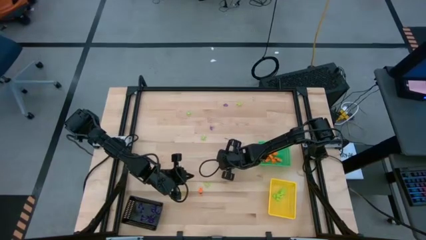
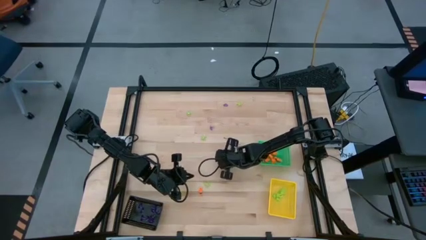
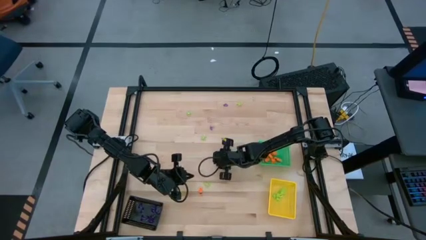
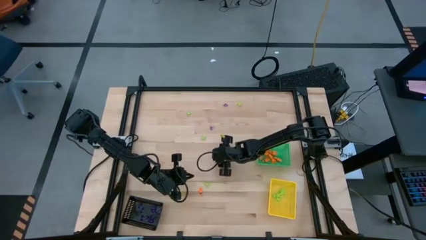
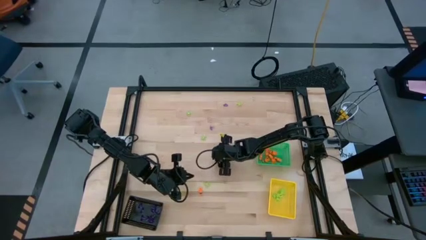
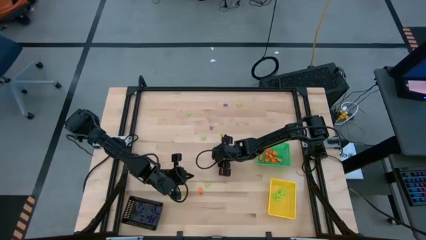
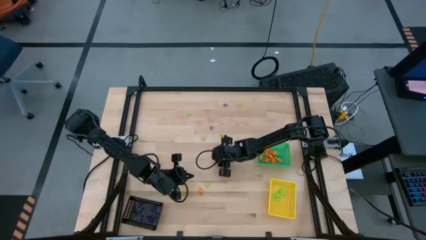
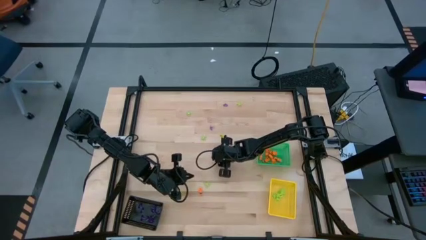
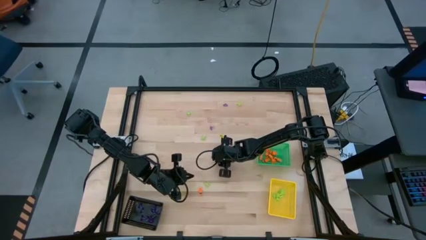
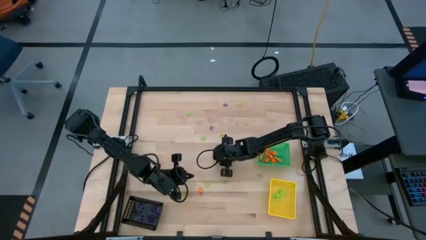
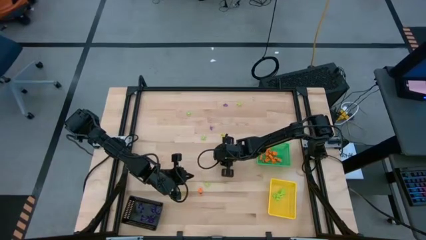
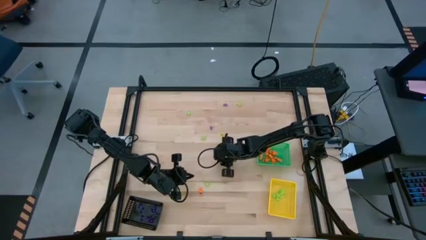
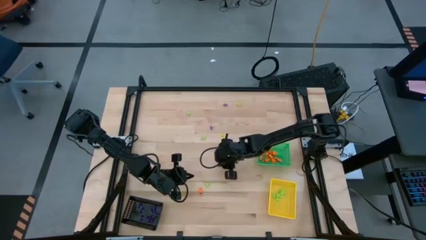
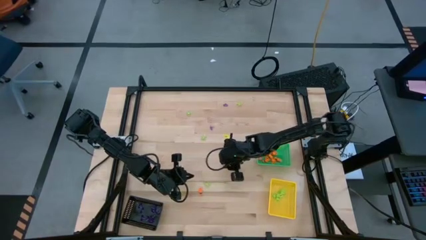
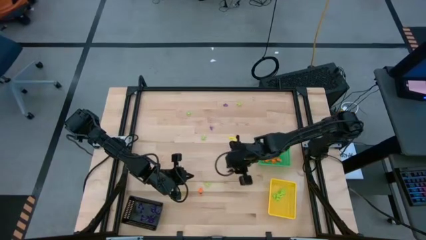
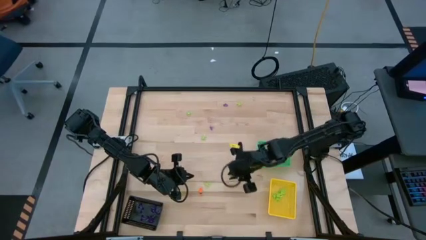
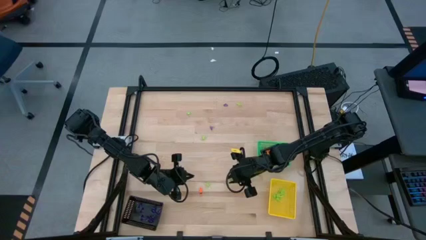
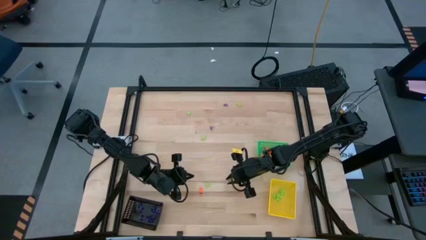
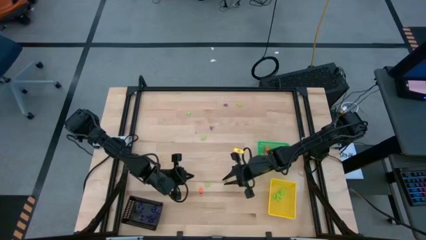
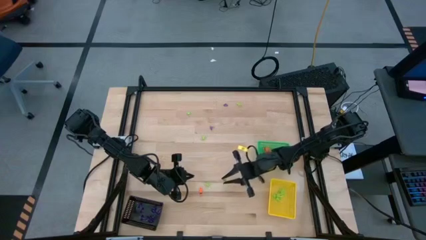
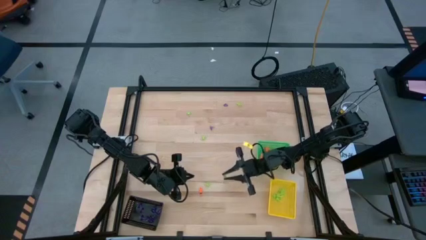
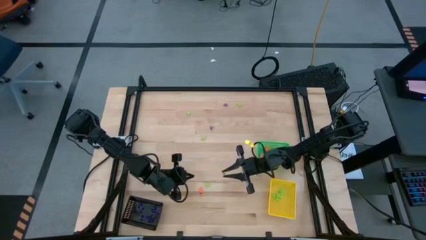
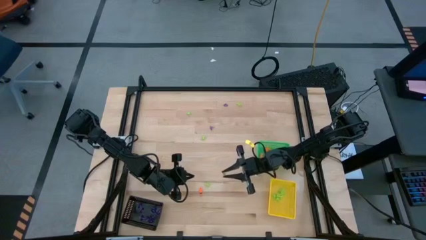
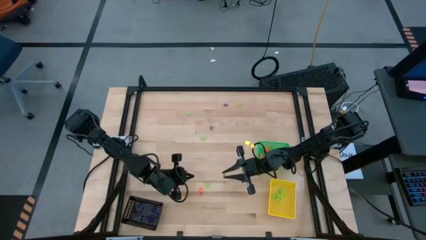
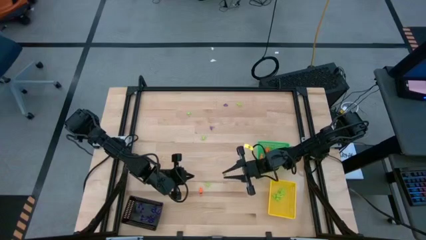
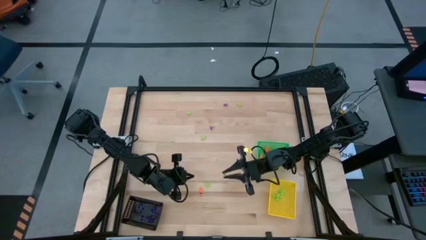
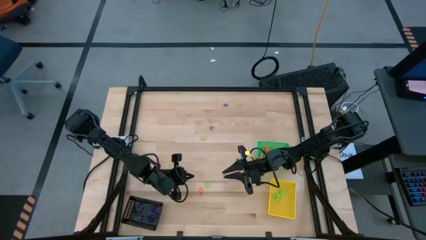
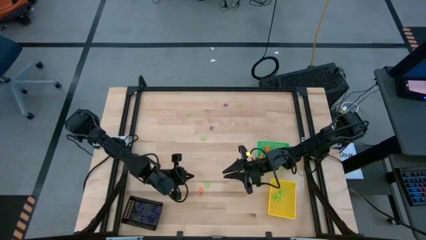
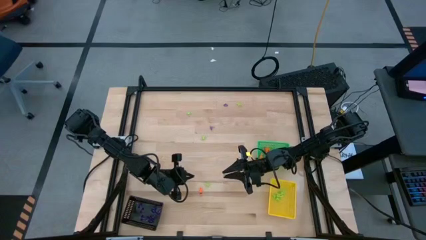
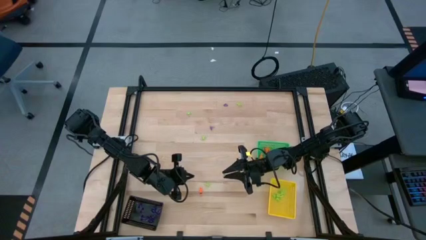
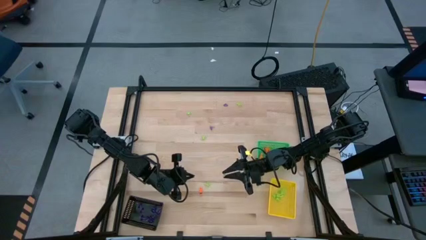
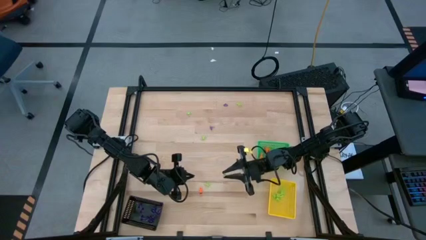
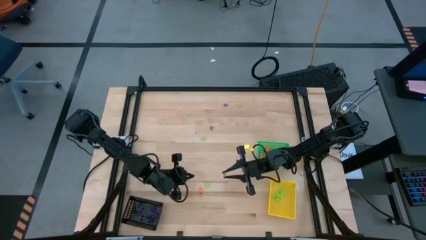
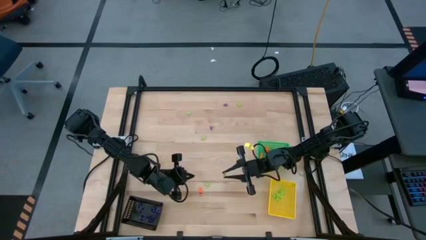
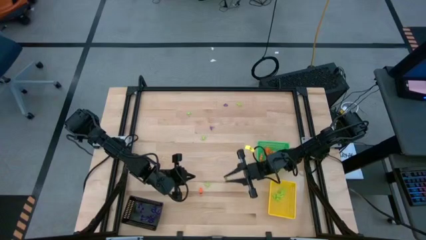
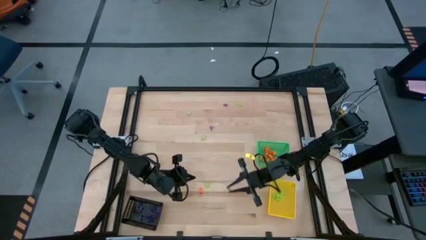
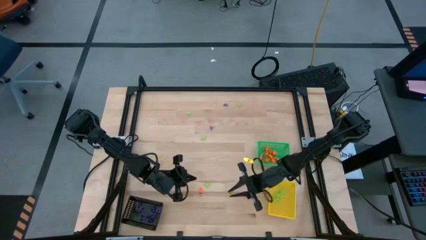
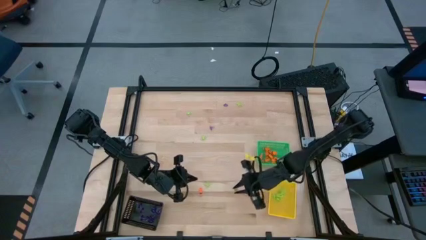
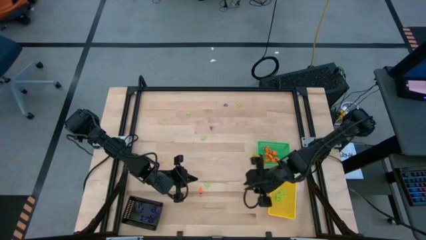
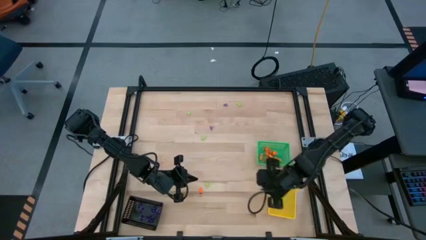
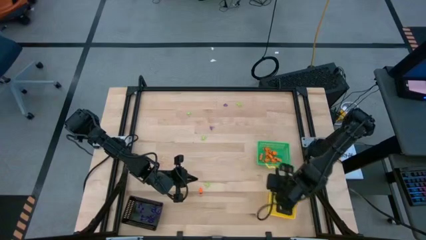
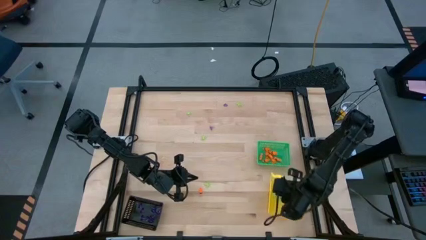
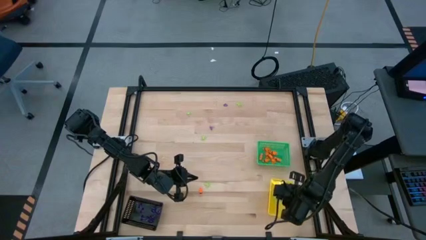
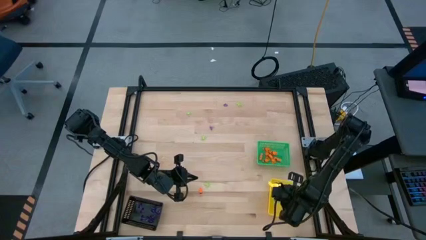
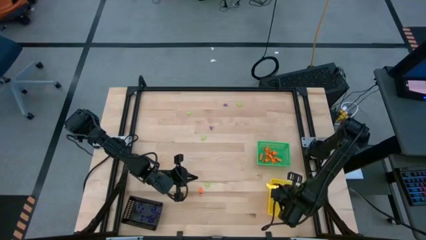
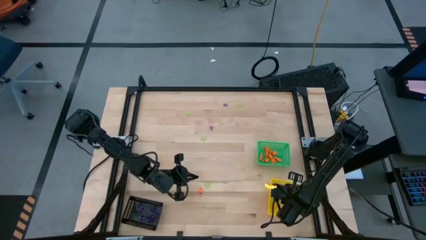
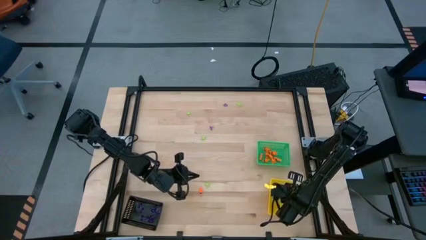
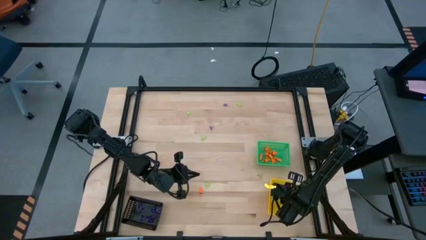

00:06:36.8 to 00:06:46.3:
Task: Sort Halloween decoration
Put the green spider toy into the yellow bin
